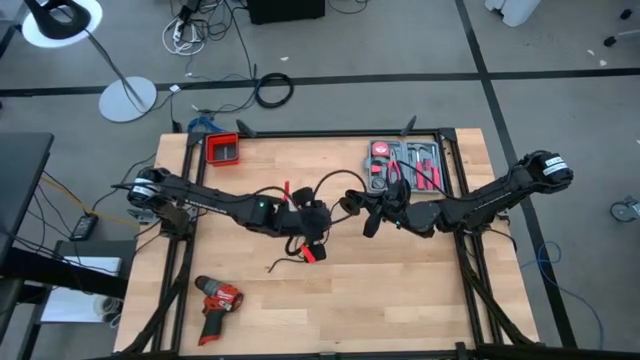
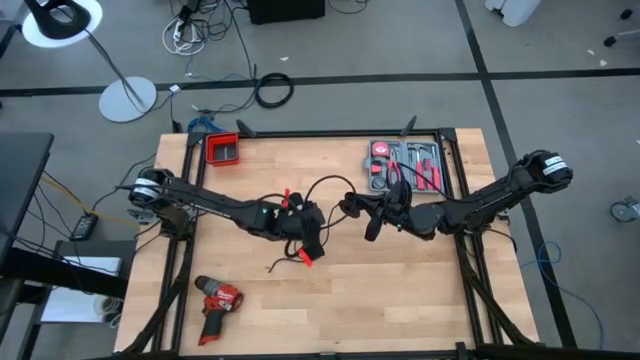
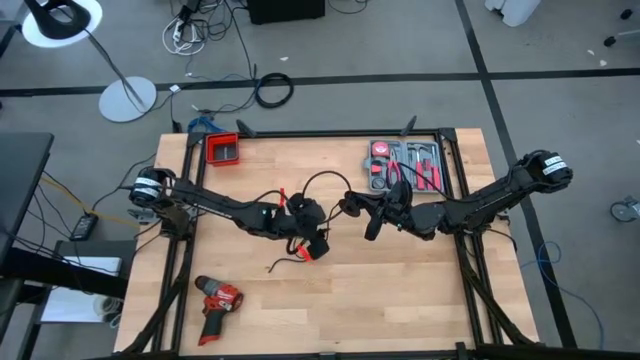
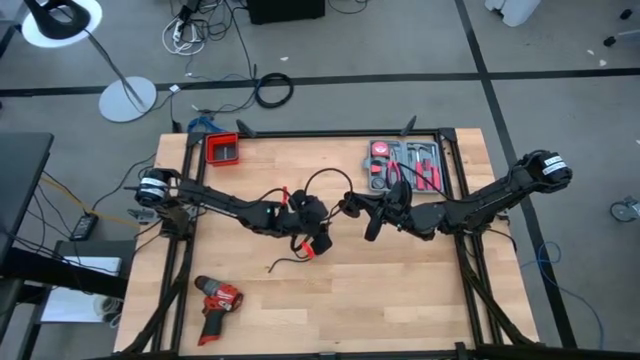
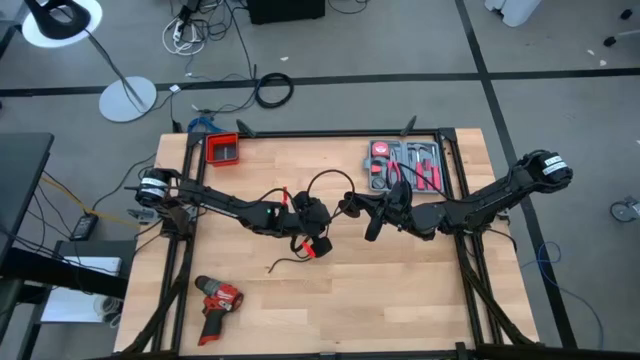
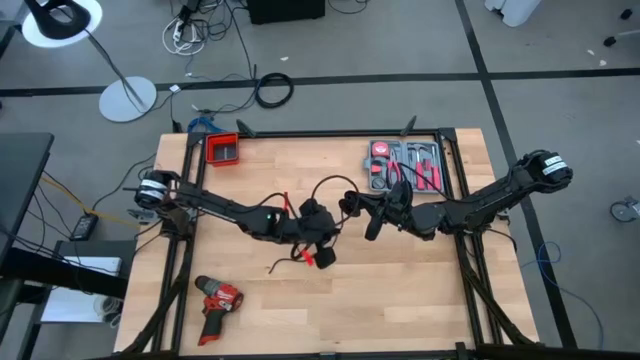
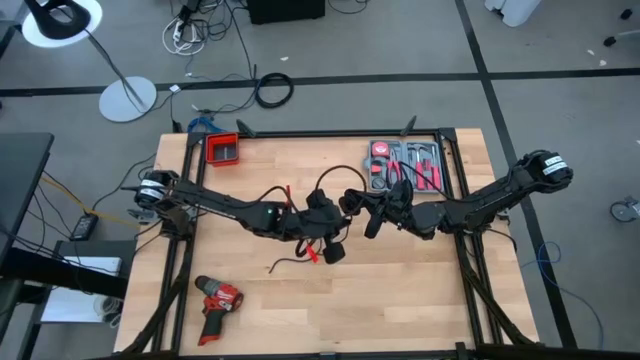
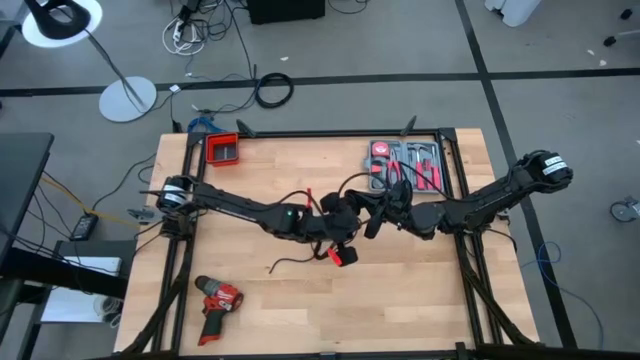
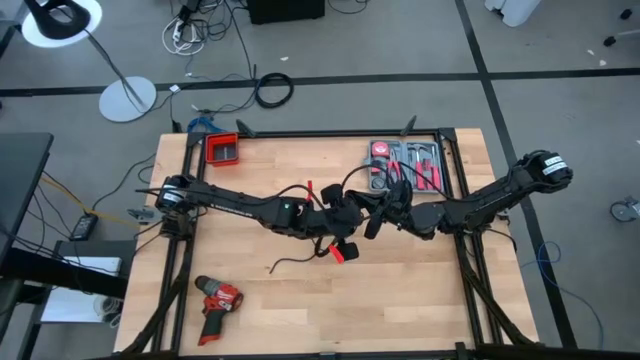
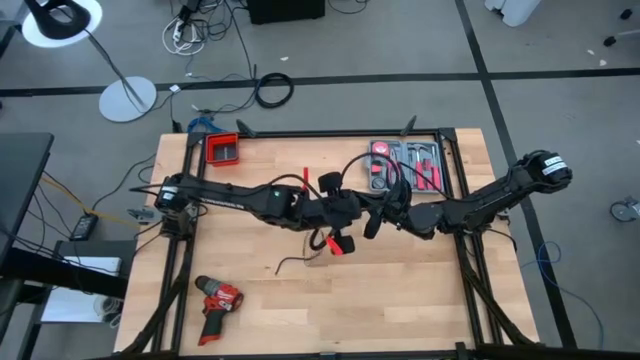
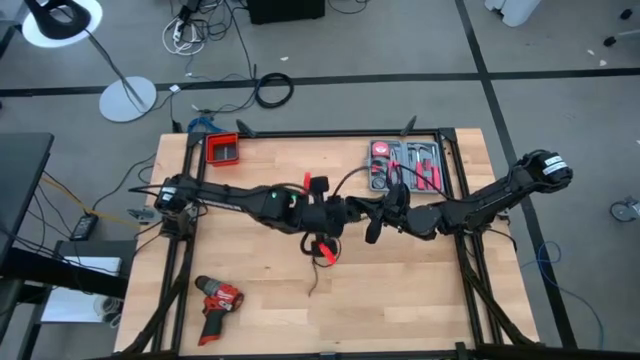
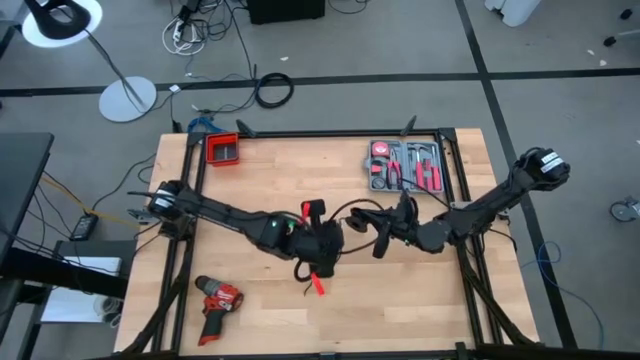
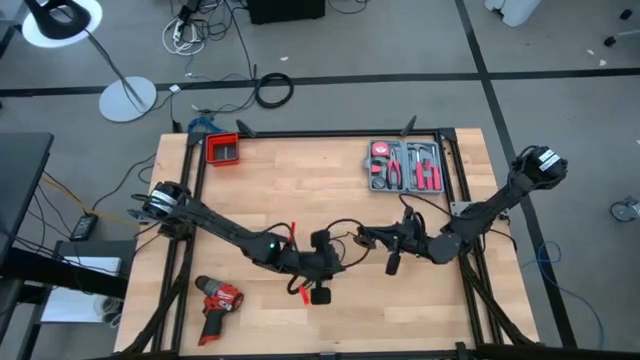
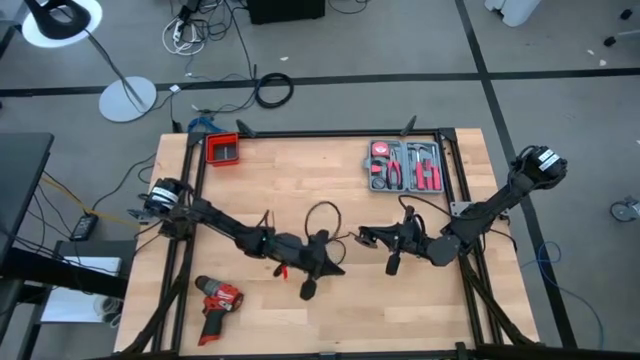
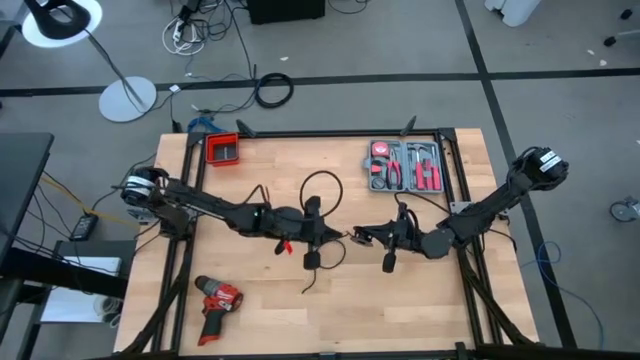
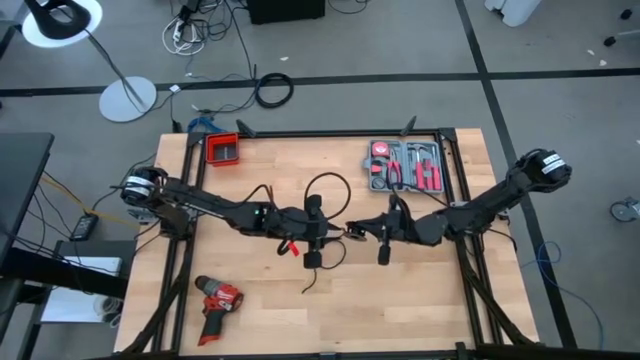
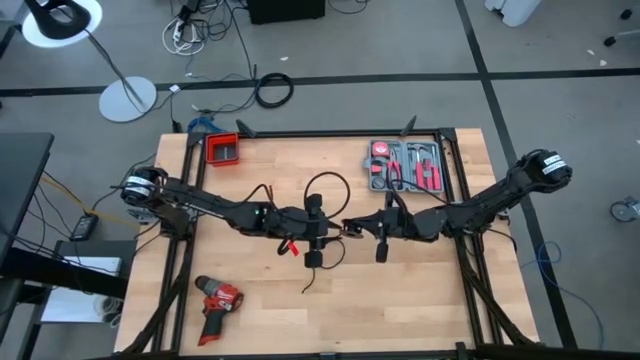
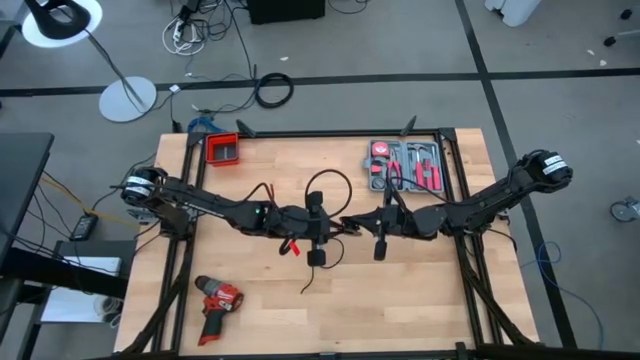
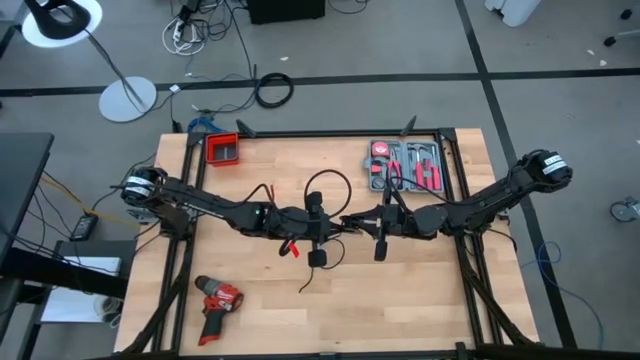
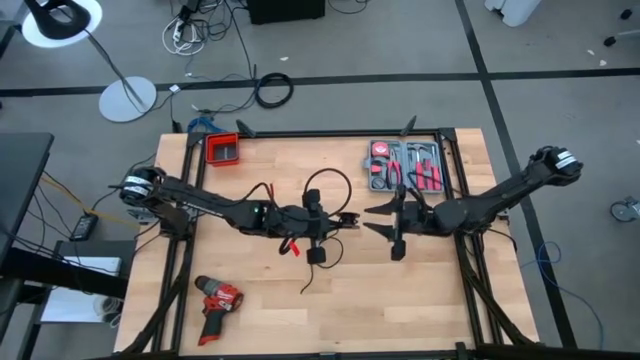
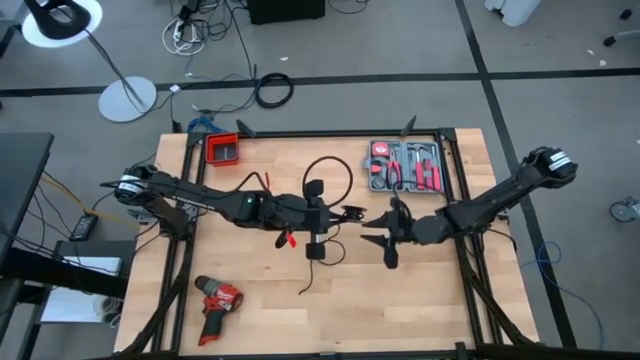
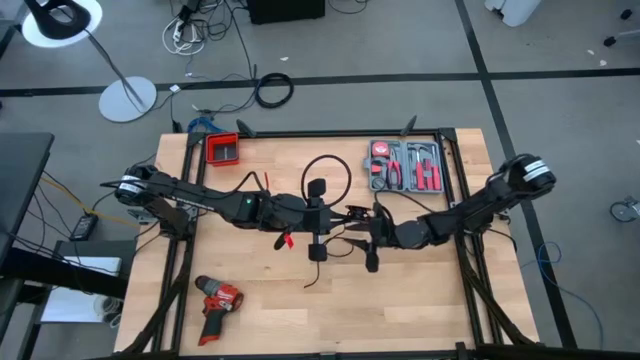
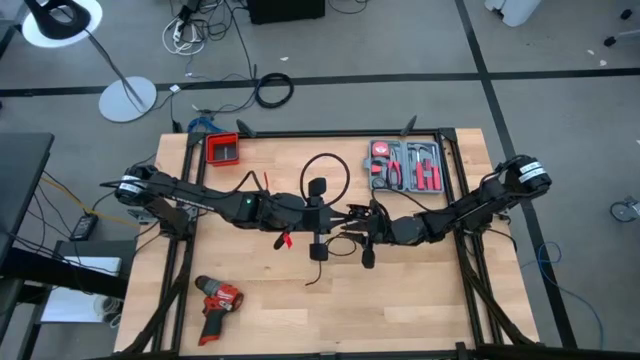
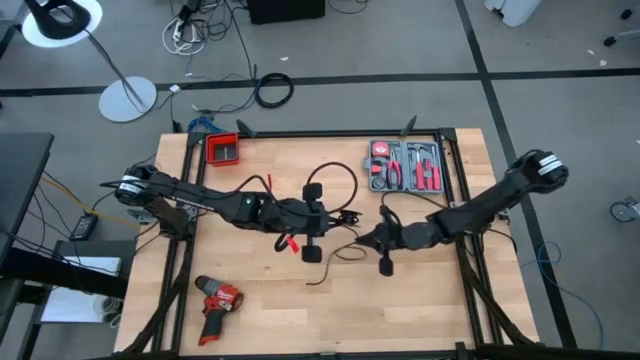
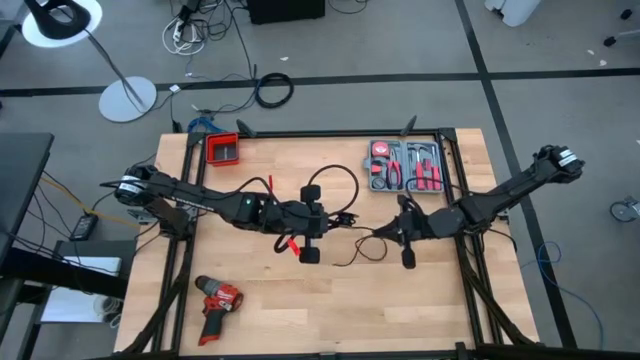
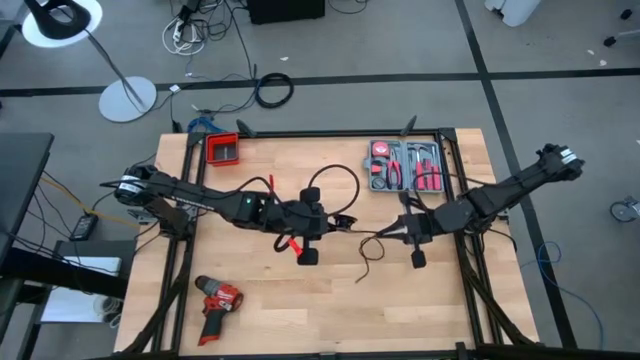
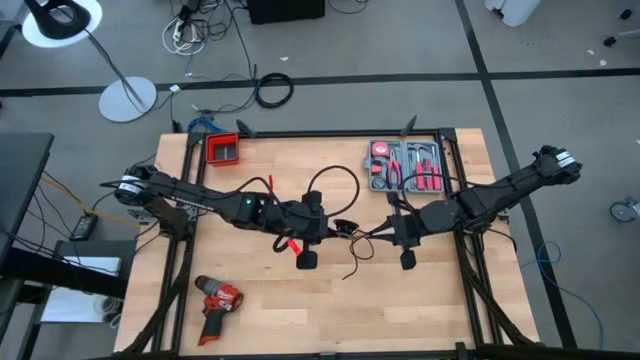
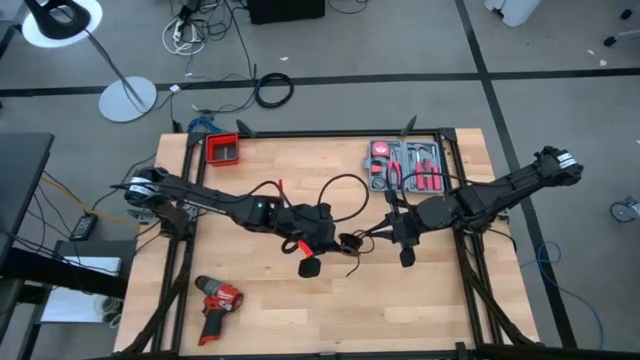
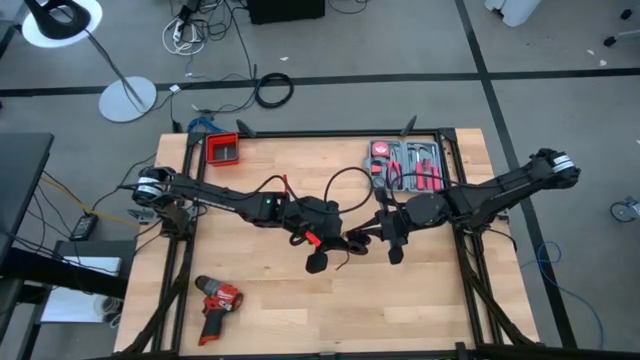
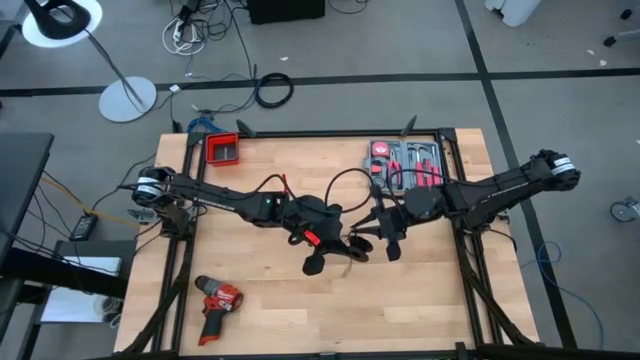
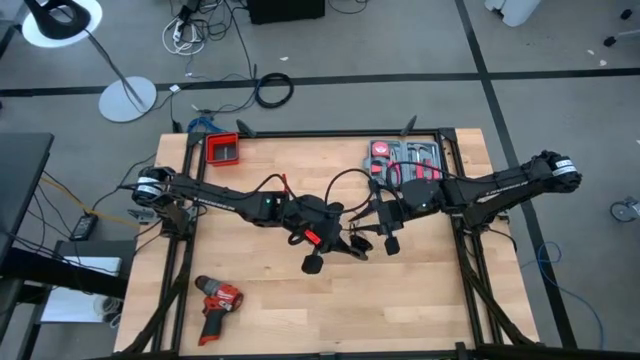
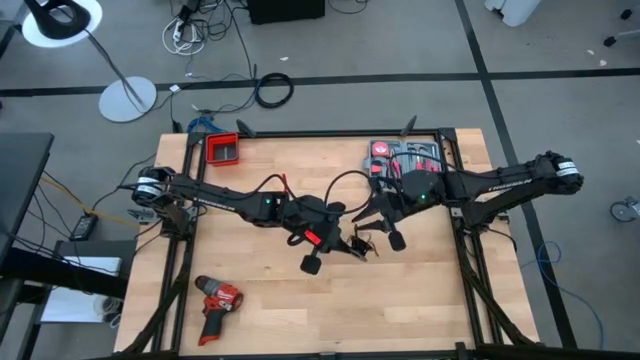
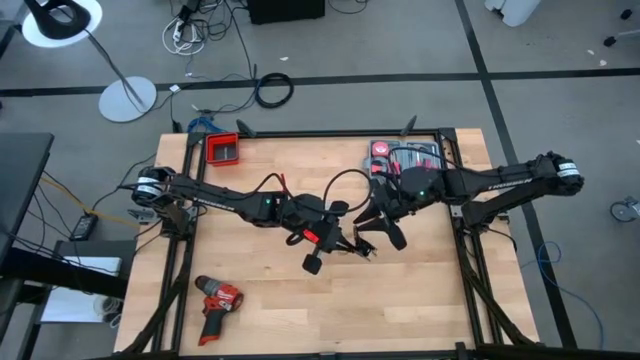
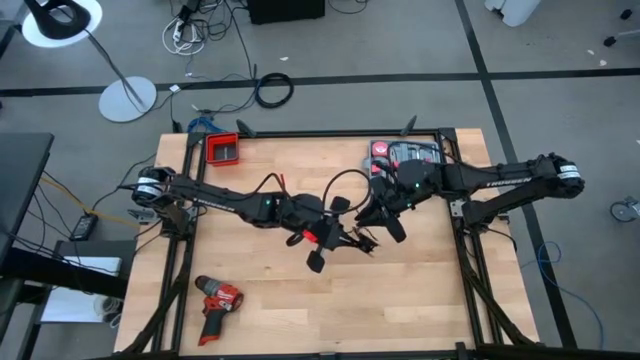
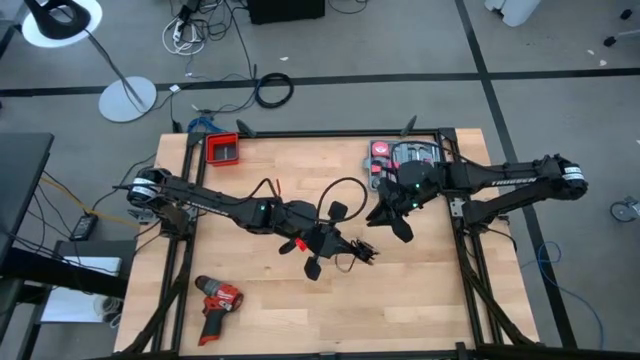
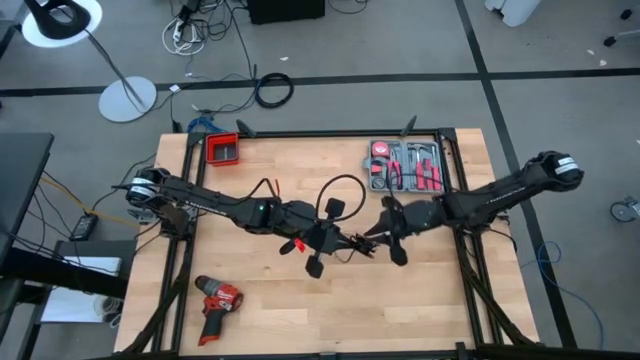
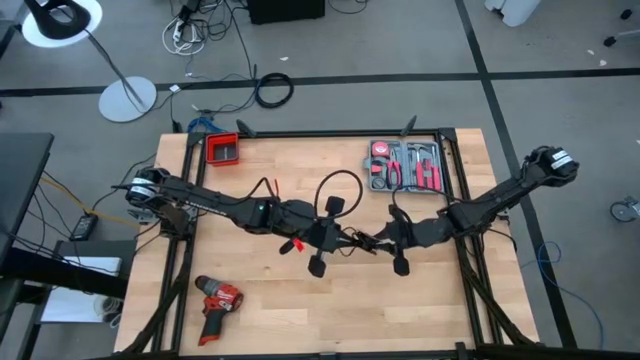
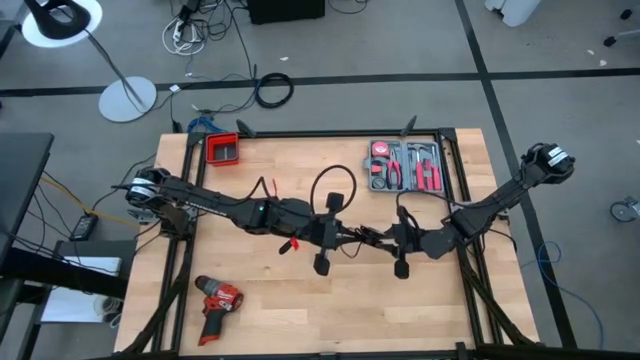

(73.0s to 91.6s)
Task: Coil cords
Coil the black wire onto the black spool

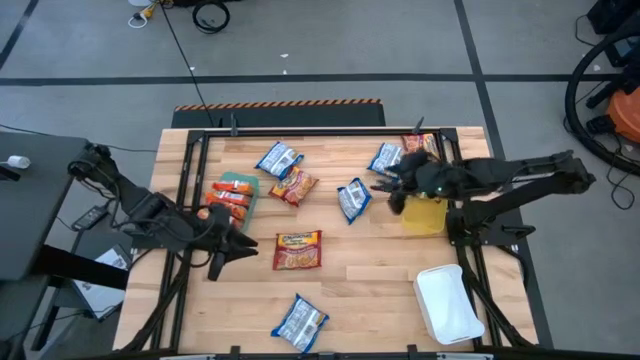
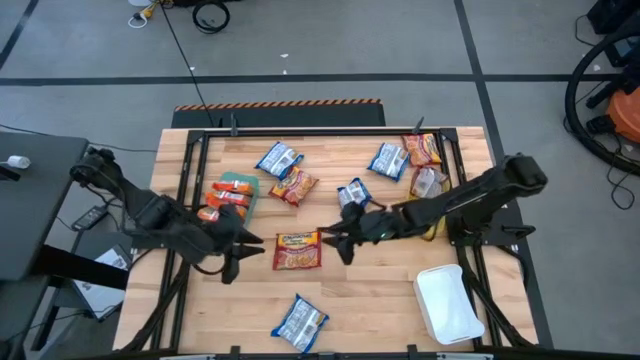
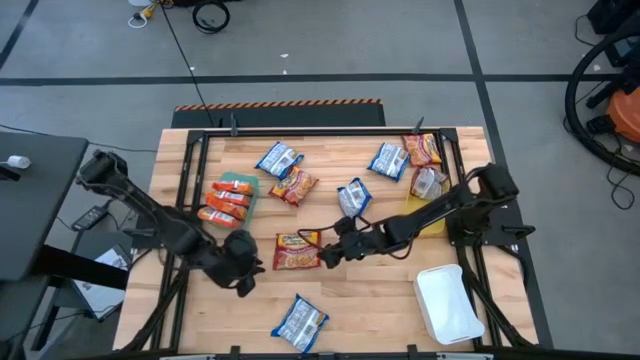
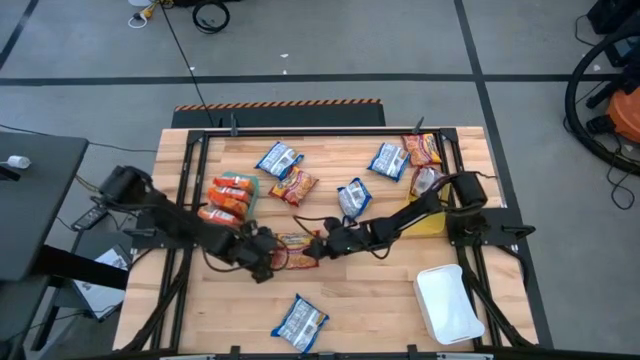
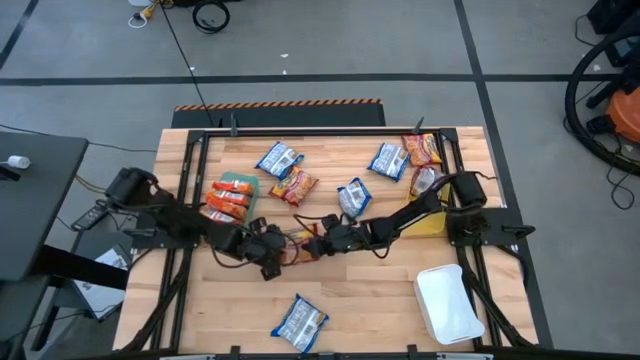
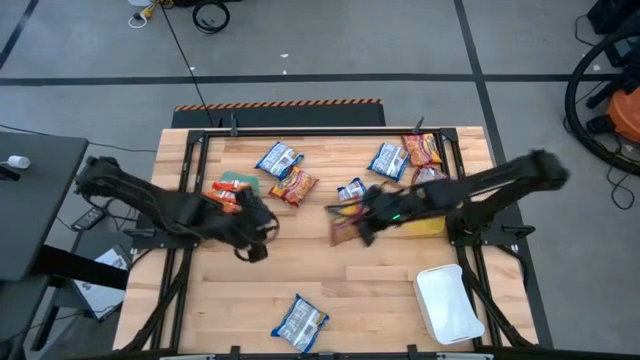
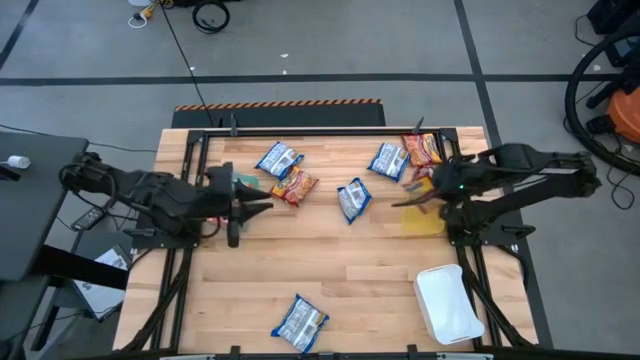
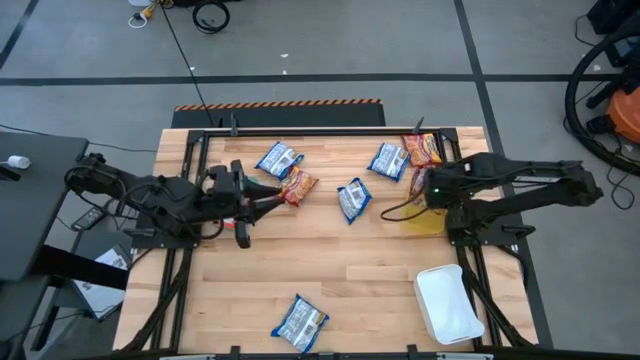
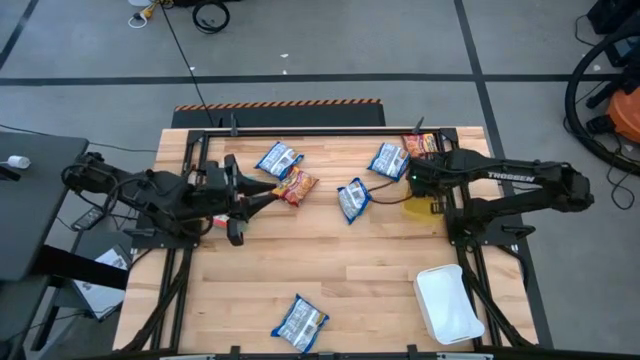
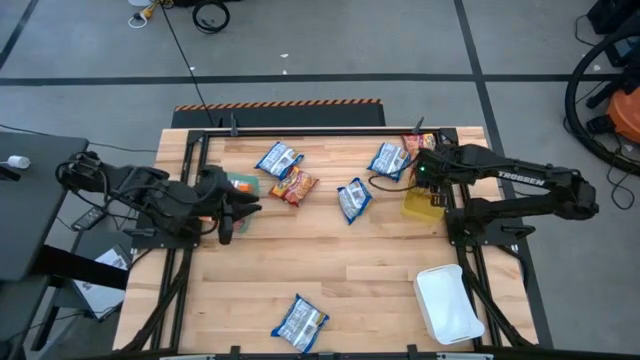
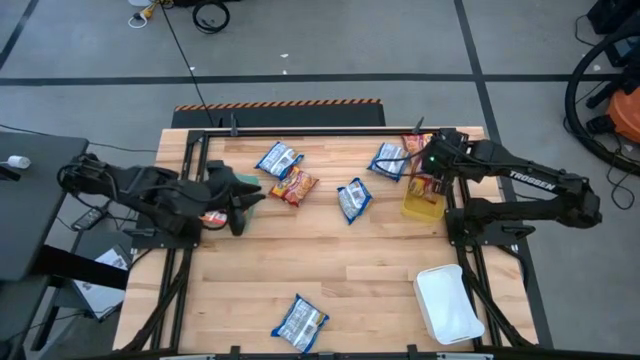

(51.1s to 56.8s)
Task: Sort Maruchan noodles
Put the red noodle pack into the yellow bin
